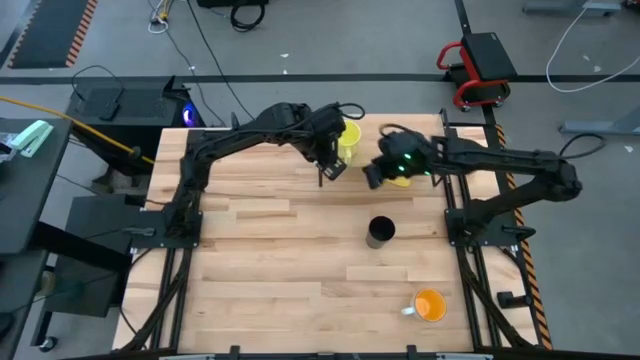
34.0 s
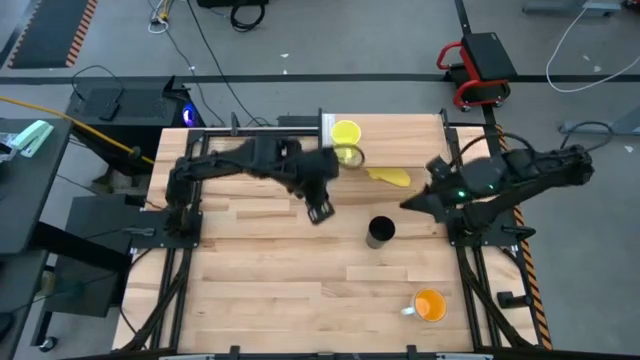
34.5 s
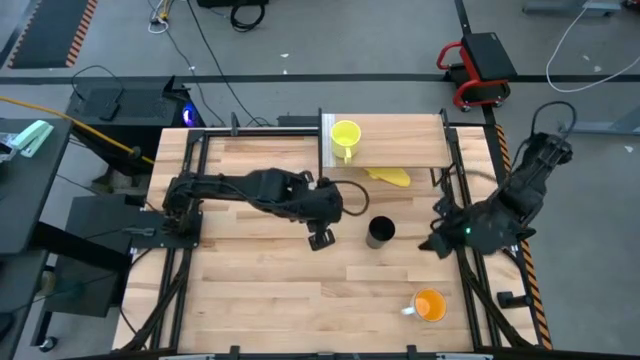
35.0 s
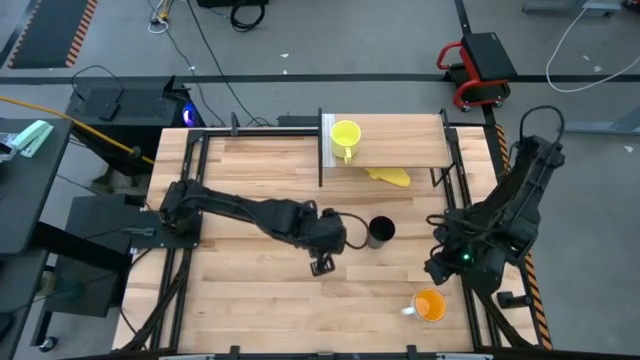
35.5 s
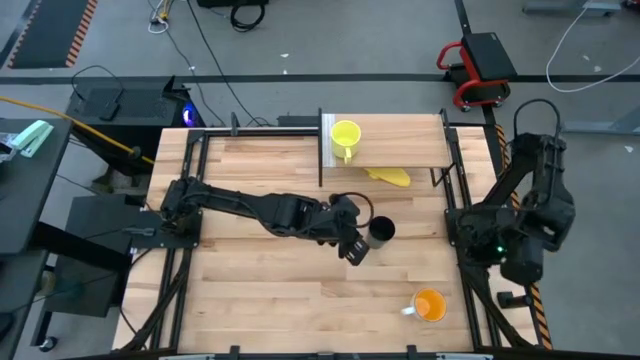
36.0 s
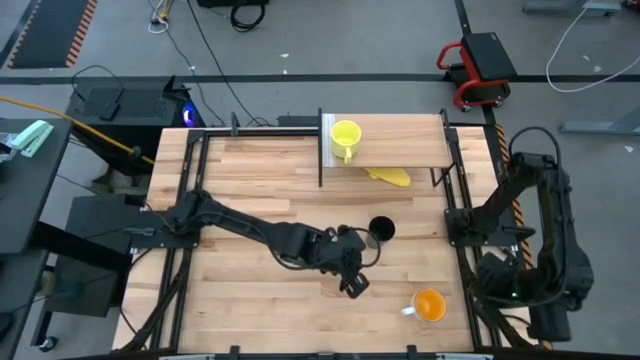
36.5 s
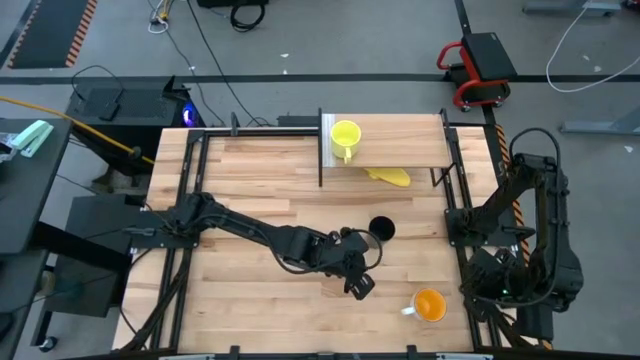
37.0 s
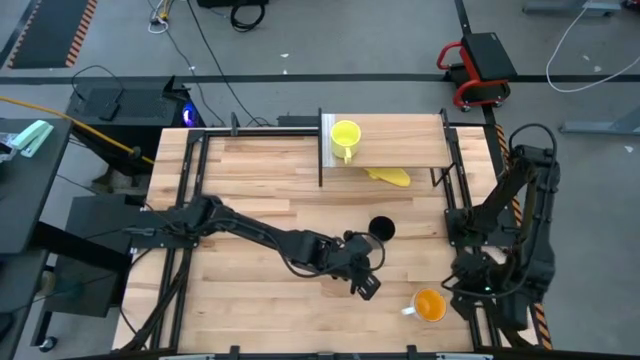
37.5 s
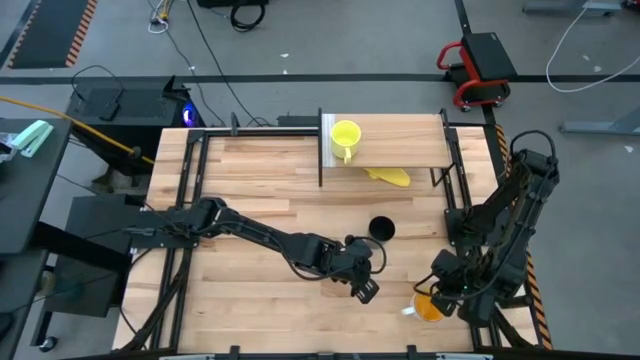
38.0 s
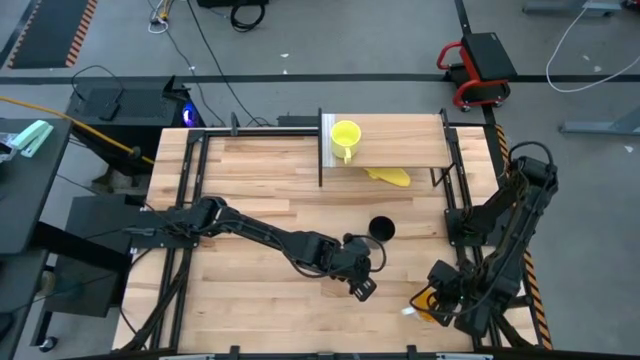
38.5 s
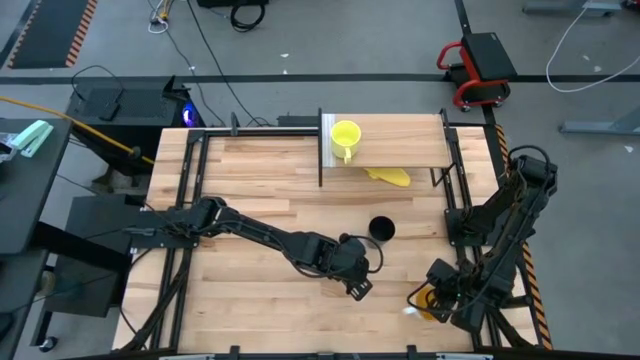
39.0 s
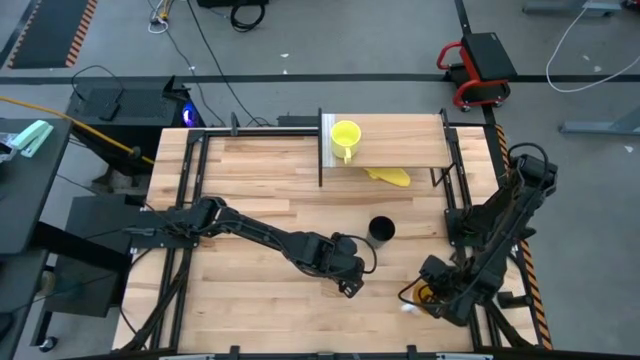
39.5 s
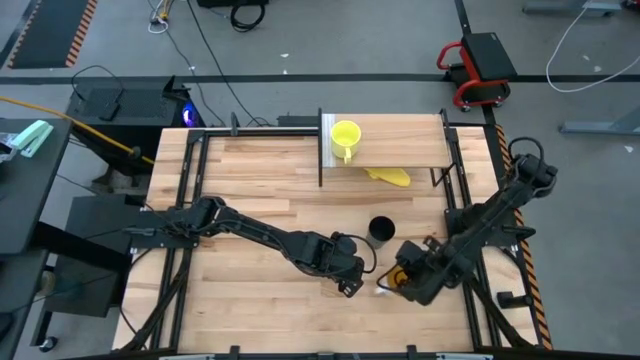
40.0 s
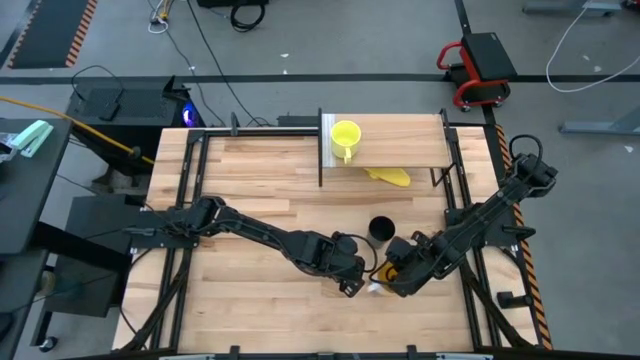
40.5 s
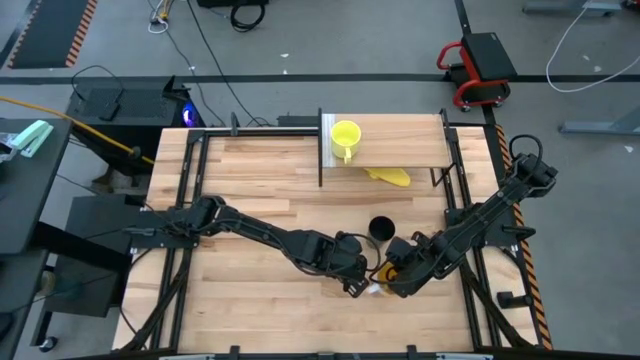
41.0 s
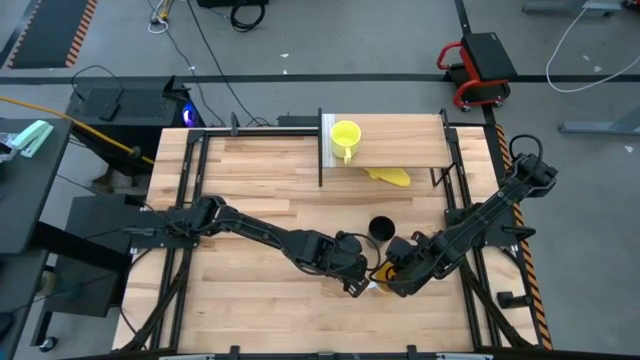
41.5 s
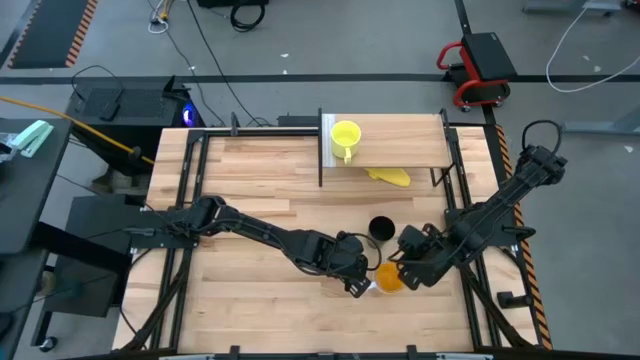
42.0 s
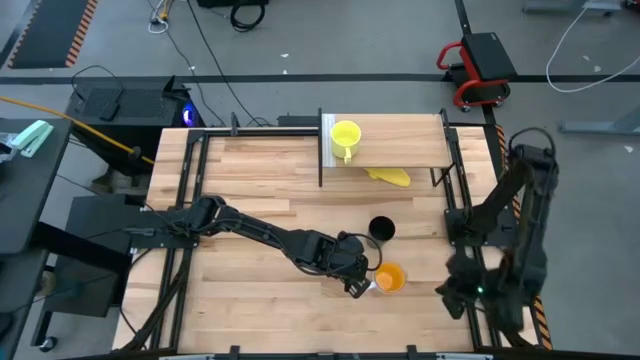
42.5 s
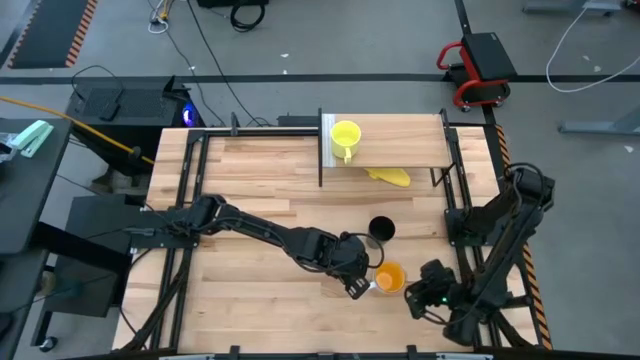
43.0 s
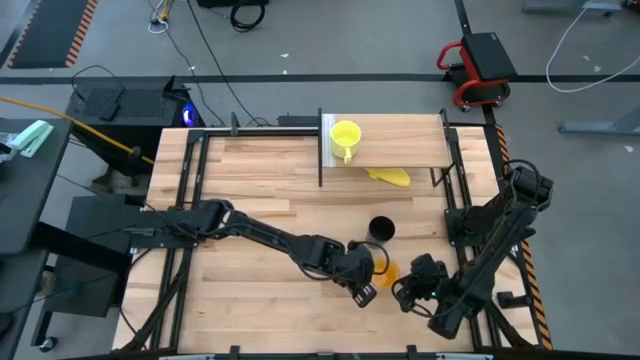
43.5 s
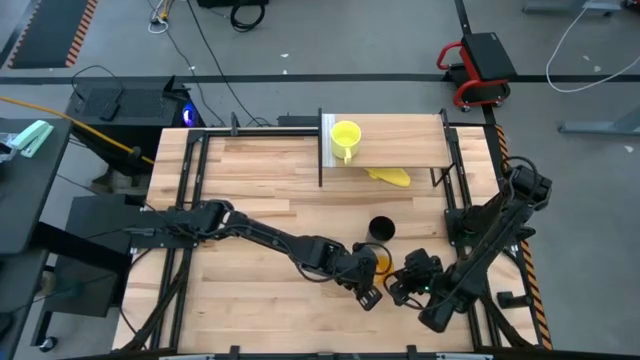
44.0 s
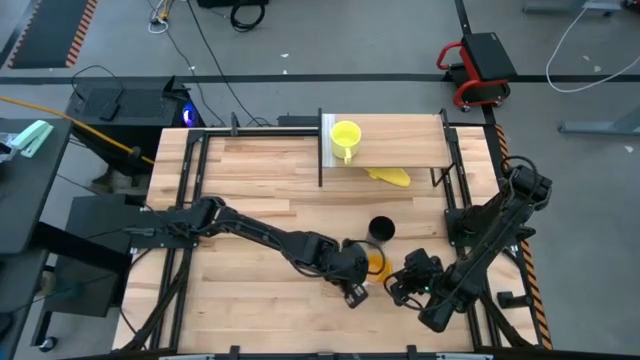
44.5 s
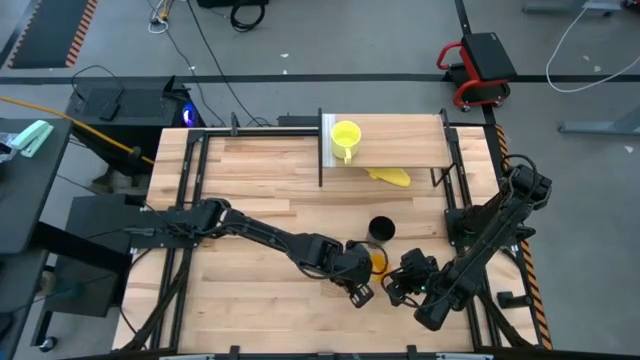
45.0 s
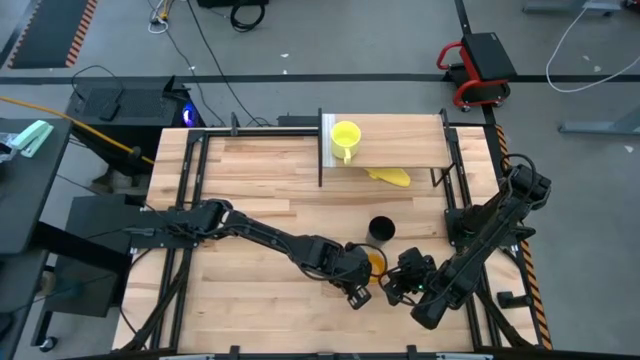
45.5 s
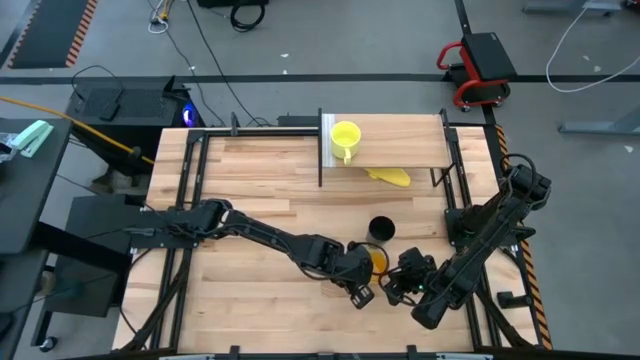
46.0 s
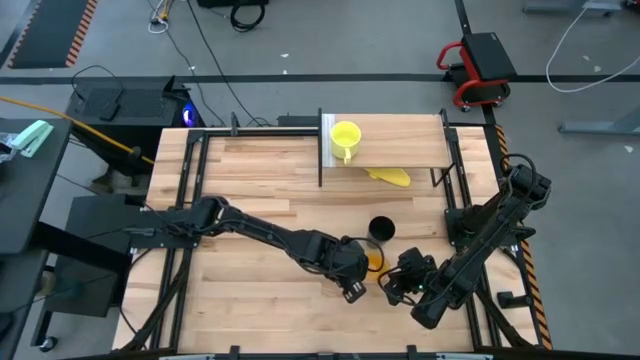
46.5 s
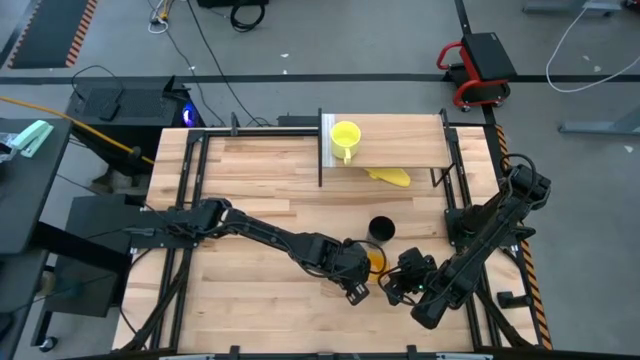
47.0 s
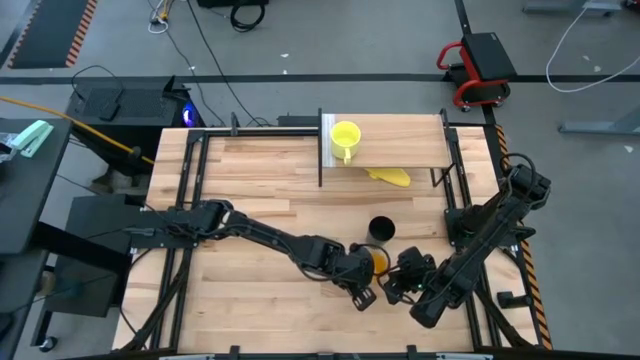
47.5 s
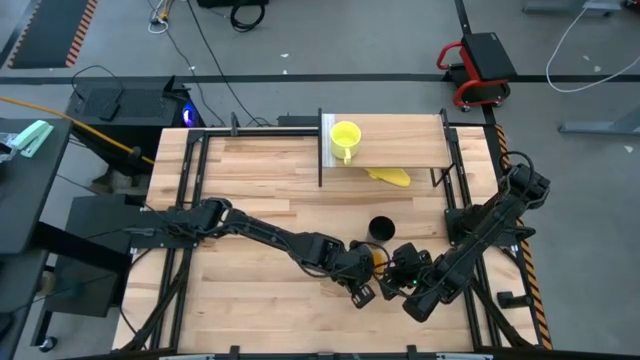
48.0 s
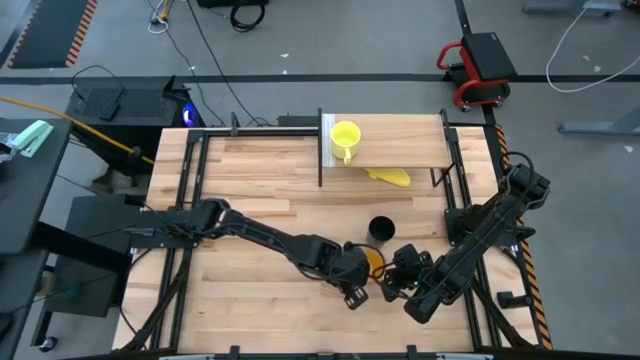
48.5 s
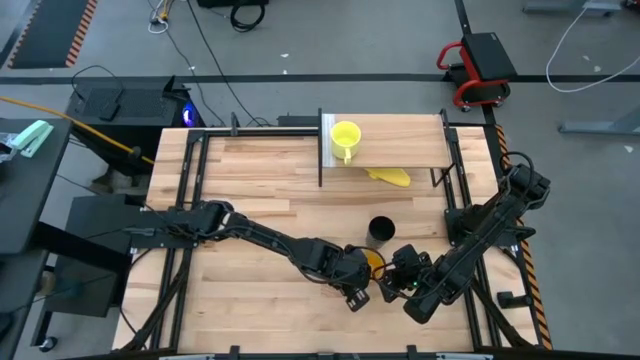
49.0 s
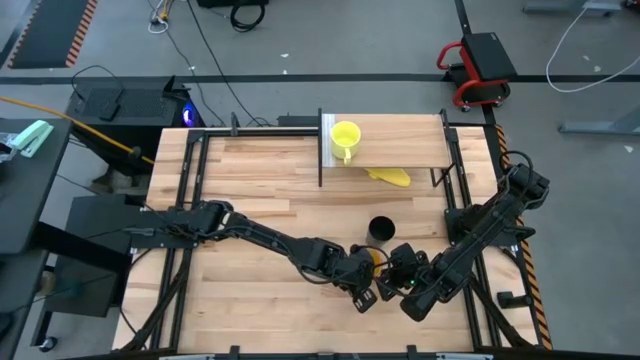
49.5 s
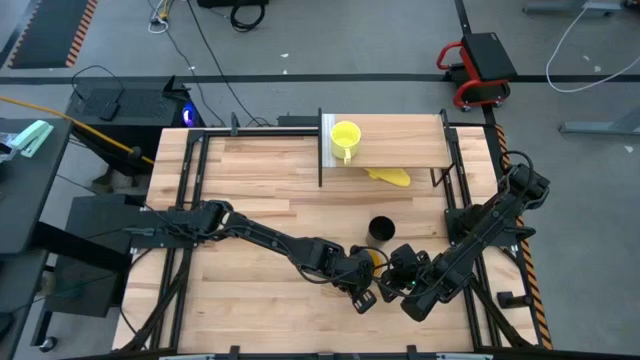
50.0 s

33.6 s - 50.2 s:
Task: Stack small to large cups/mugs on shelf
Put the orange mug on the shelf

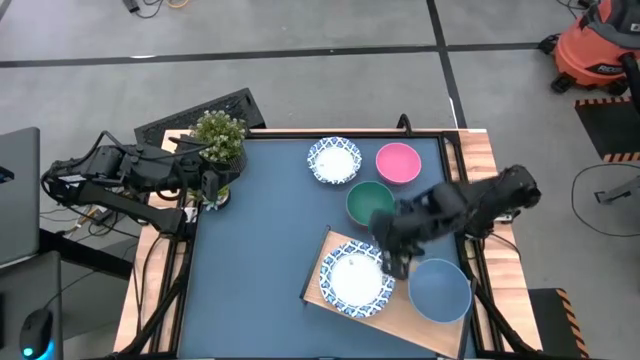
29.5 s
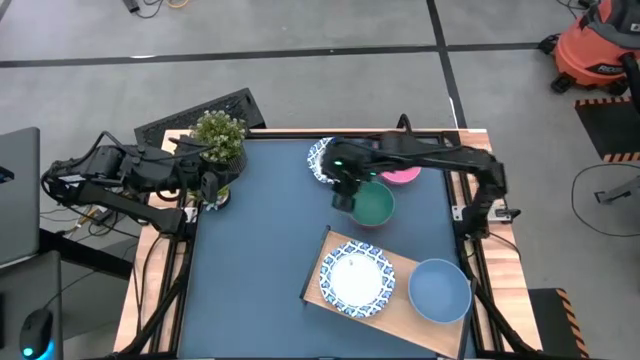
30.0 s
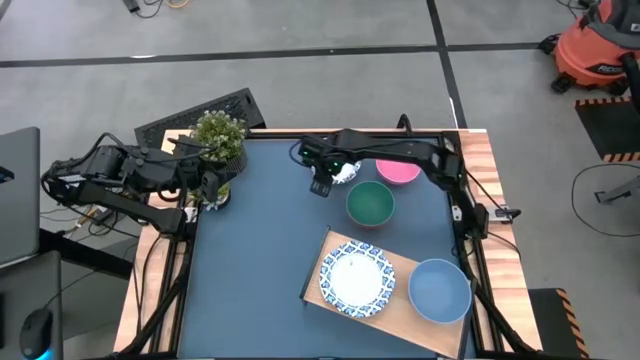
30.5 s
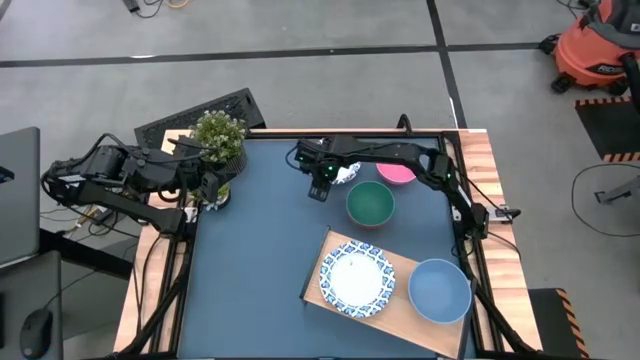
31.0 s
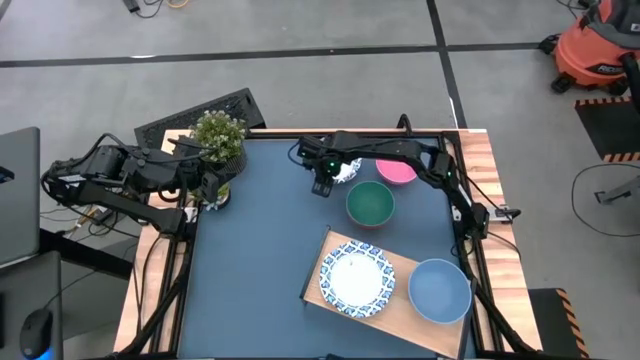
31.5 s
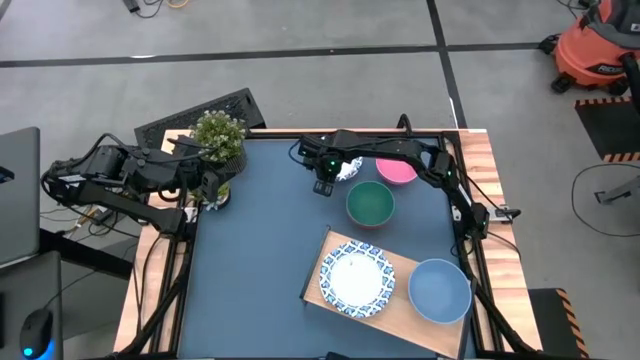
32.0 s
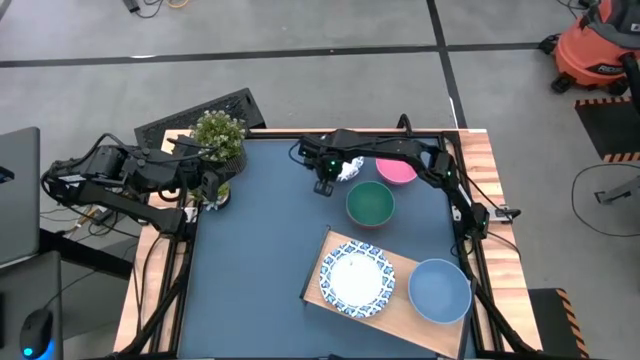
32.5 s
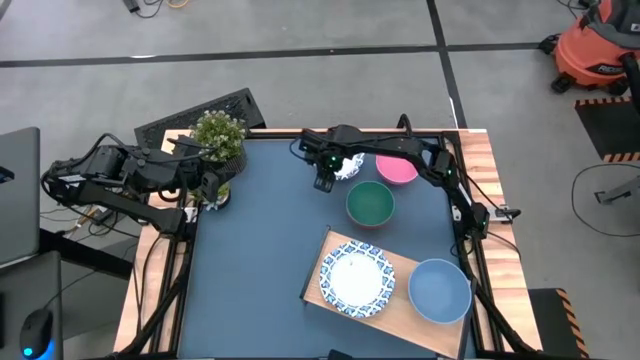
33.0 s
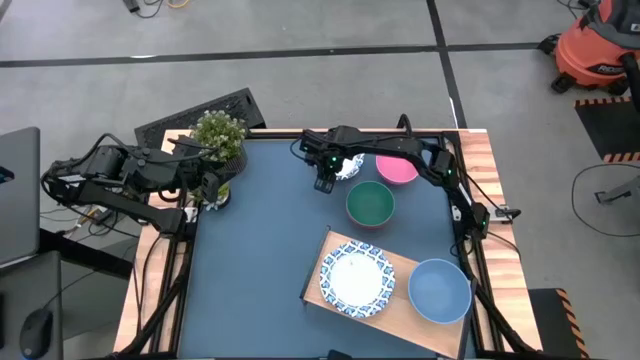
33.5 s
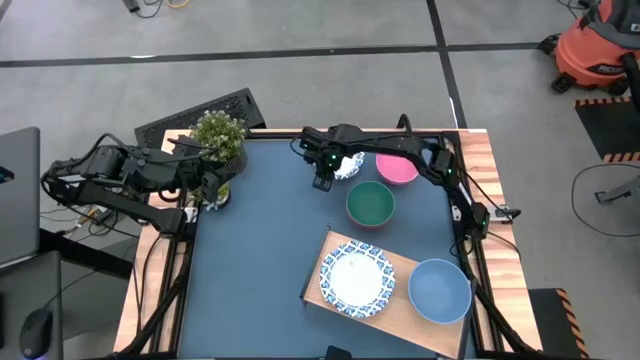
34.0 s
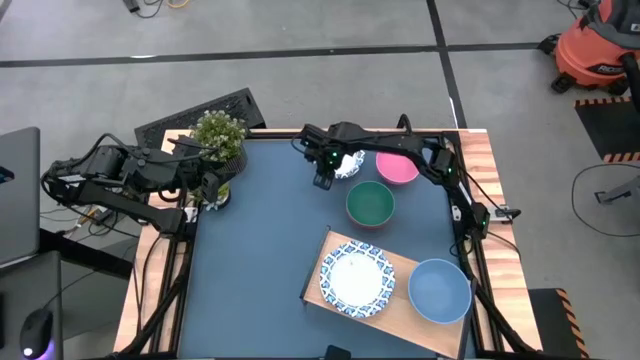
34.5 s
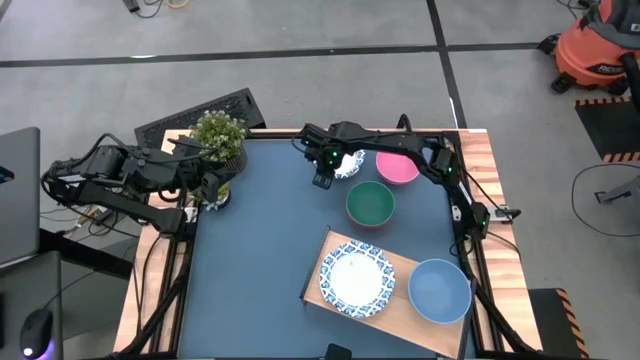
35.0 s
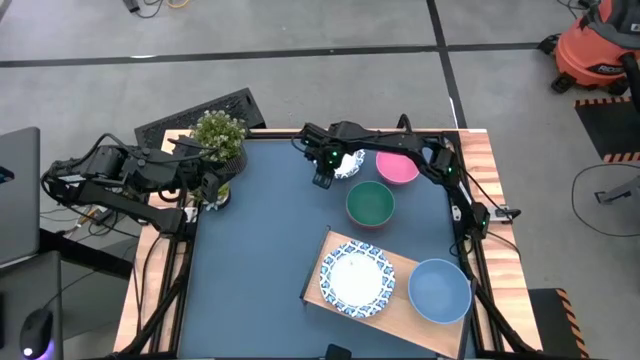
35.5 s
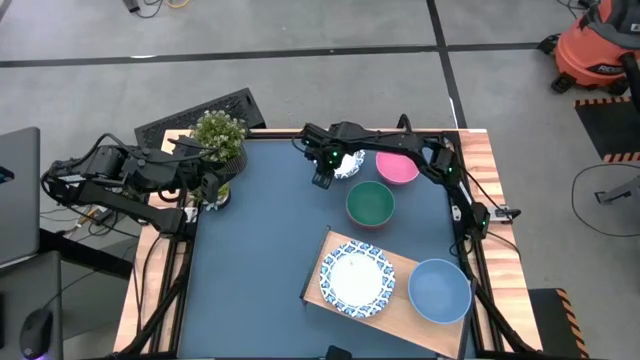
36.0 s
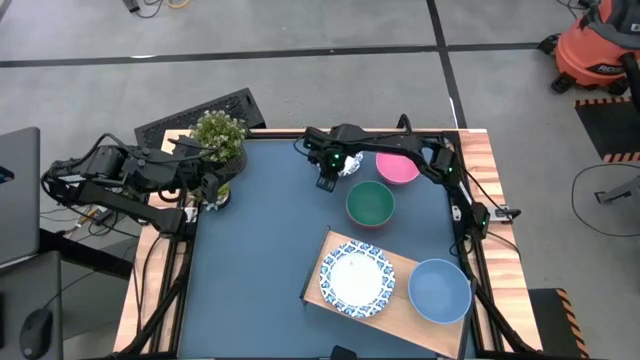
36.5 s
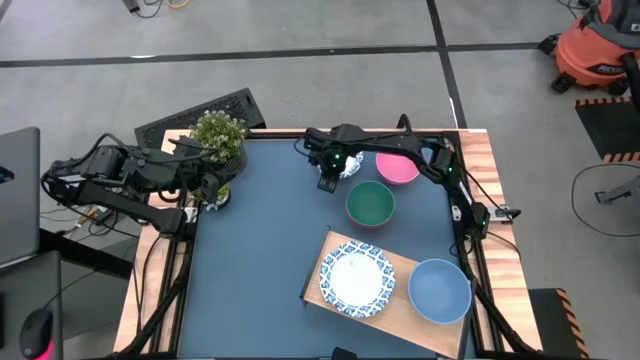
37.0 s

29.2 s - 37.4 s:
Task: Place and stack bowls onto a shelf
Stack the white bowl on top of the white bowl on the shelf
